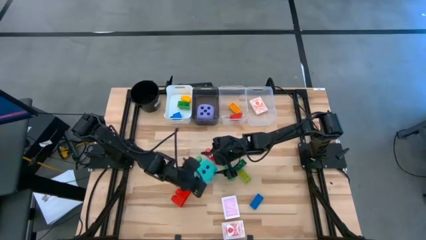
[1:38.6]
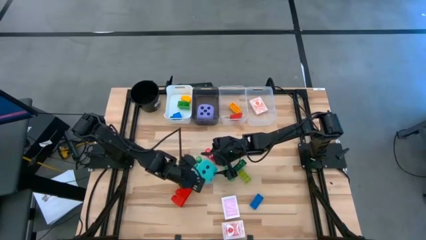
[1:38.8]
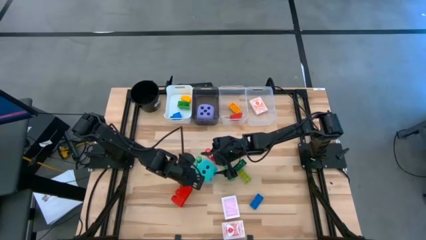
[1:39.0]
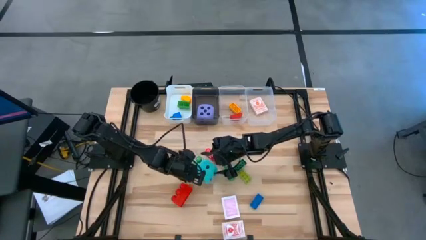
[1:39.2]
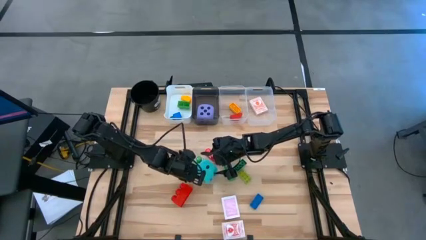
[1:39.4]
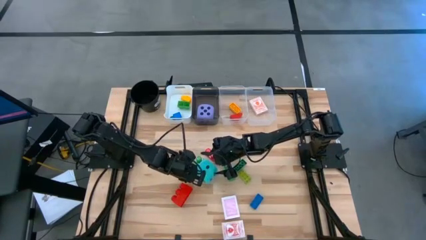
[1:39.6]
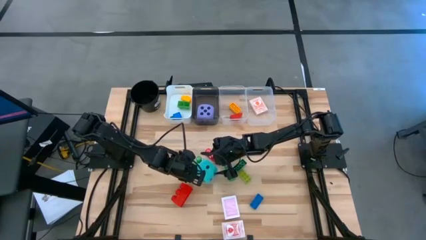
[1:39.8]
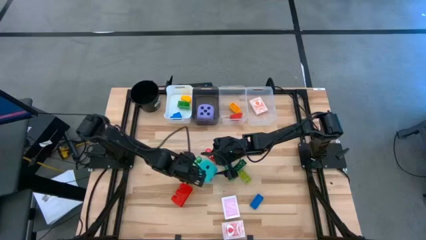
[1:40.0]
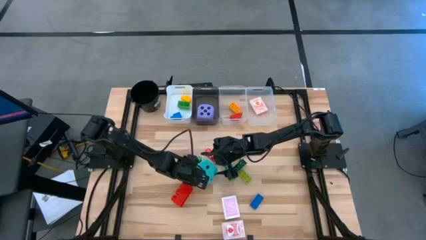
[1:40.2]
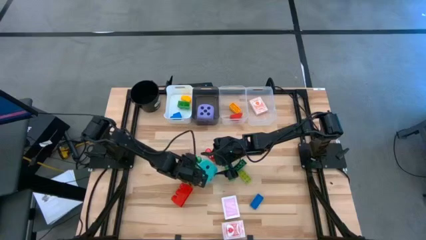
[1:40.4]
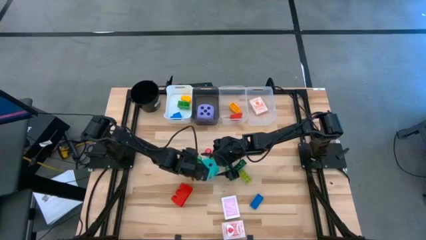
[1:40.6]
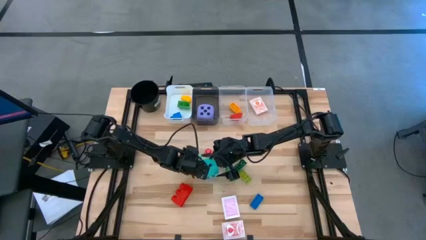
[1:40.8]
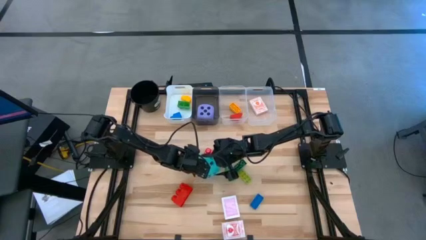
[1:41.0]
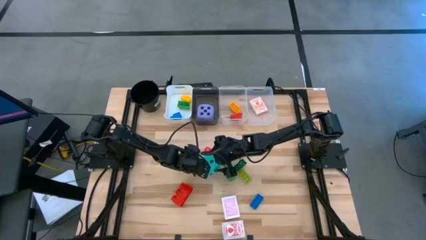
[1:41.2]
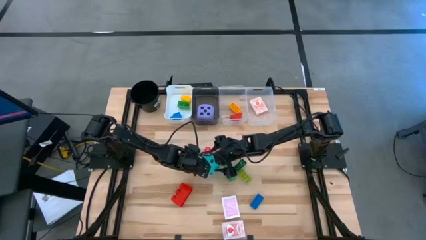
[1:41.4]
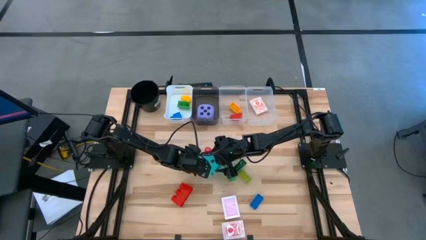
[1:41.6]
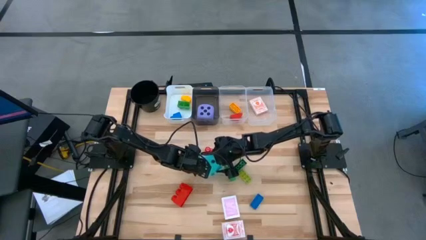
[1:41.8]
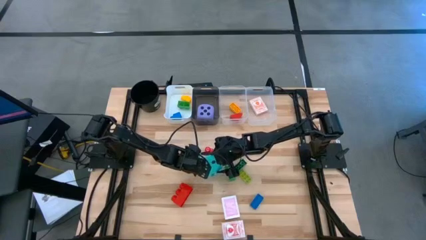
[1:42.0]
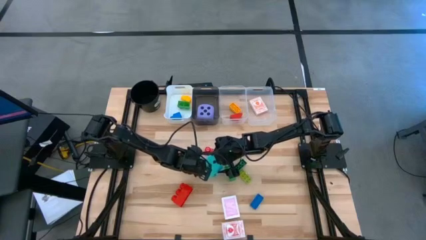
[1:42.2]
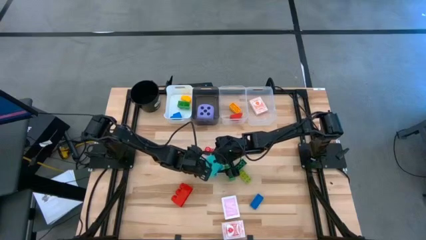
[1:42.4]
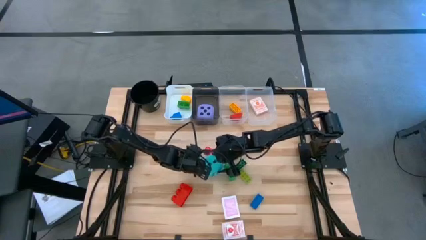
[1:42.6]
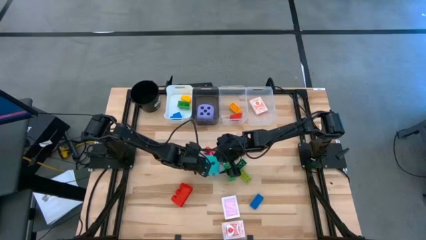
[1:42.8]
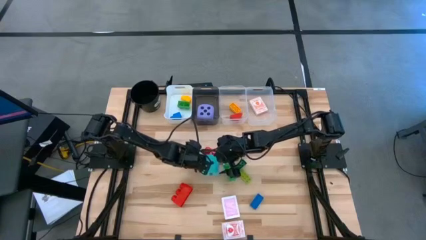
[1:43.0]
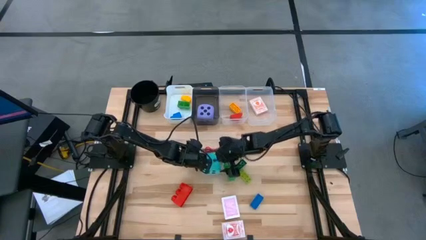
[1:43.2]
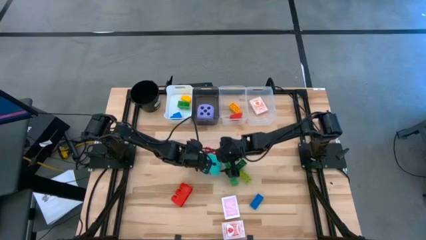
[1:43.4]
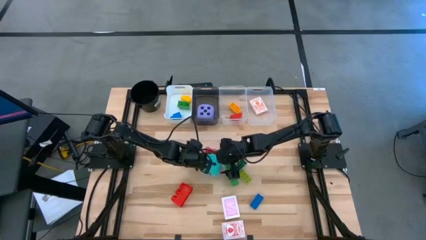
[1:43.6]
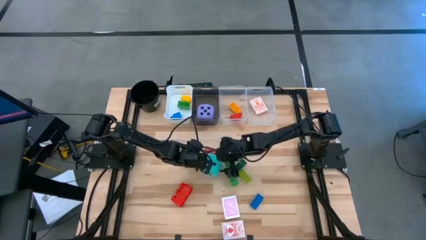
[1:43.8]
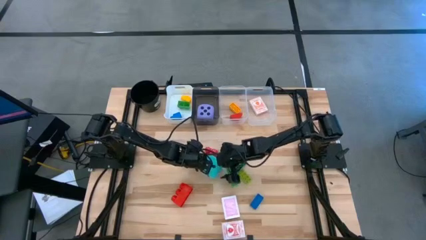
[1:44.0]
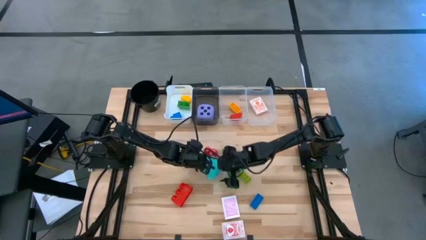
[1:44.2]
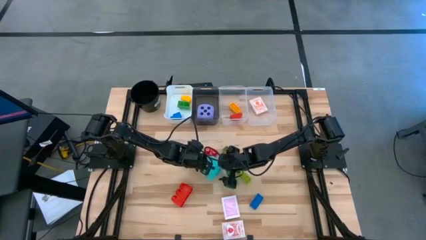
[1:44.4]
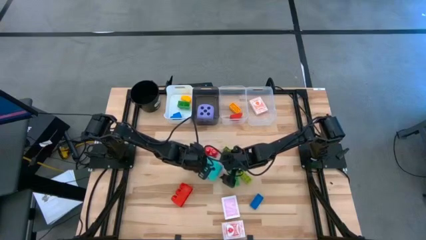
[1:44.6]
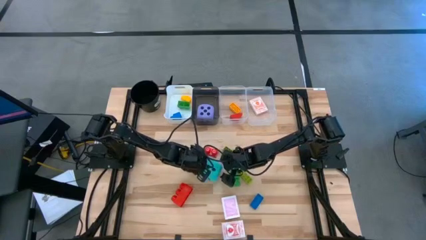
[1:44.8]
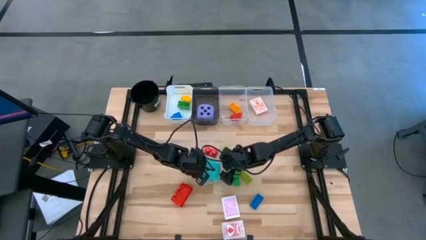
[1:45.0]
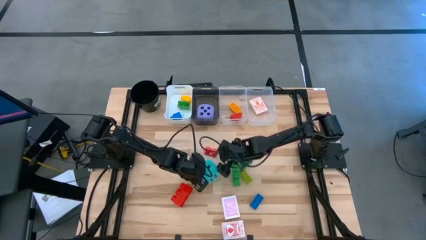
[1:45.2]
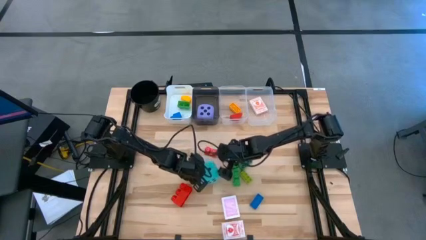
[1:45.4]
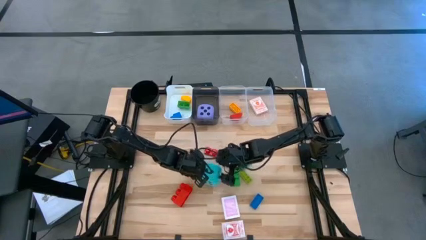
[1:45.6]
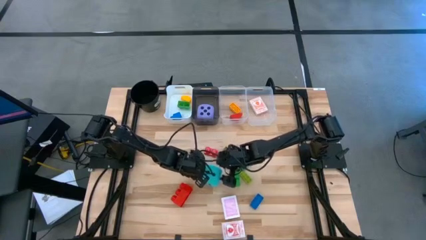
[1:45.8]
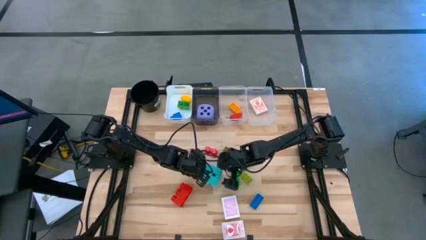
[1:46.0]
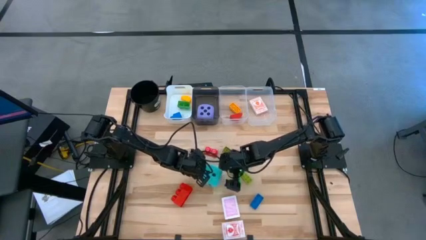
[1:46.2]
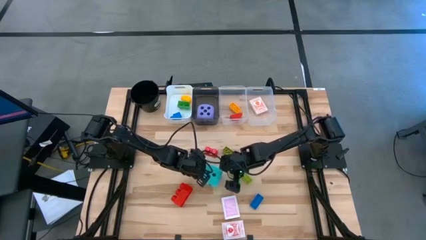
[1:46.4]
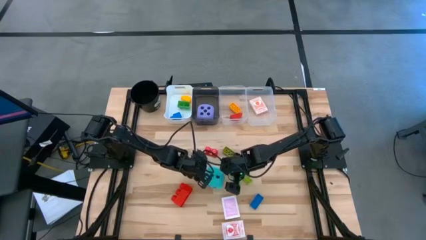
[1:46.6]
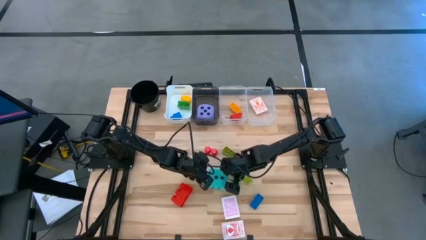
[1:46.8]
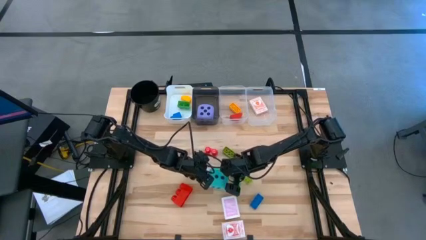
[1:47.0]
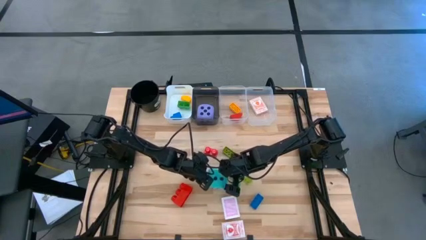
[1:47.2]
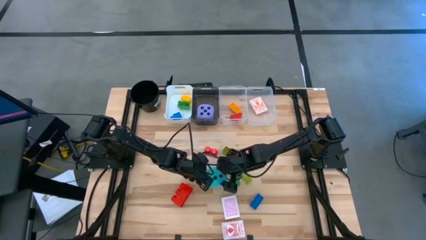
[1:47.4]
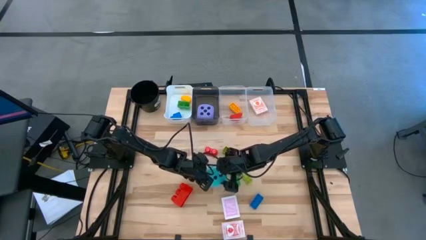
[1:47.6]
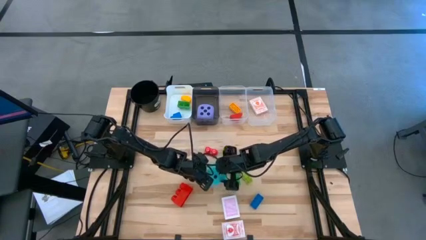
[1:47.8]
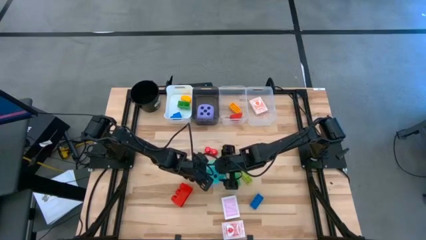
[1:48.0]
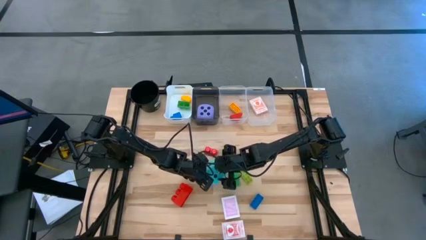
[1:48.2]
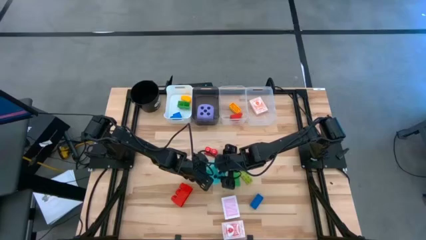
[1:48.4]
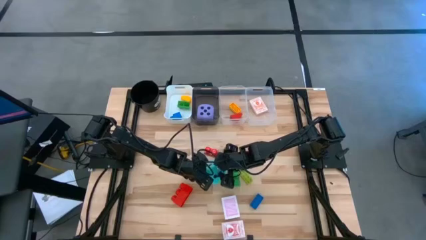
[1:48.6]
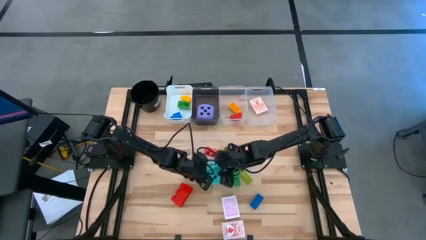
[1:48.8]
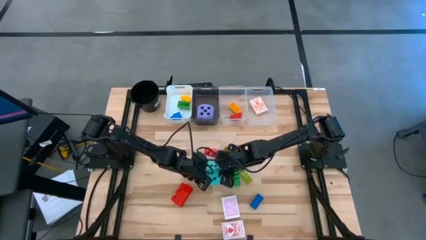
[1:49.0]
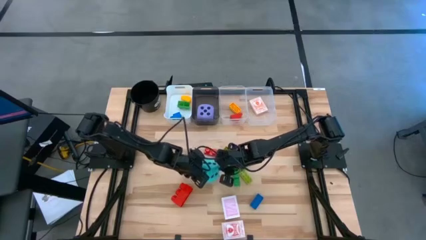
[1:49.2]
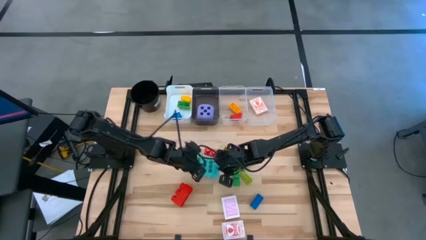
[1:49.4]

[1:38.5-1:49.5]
Task: Pick & Place Toys
Put the blue dice into the black transparent bin
